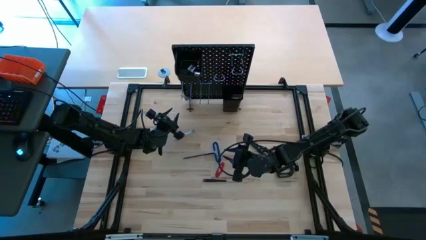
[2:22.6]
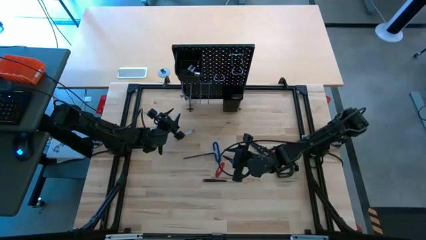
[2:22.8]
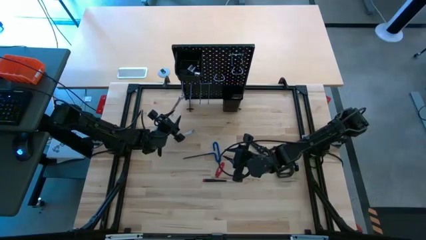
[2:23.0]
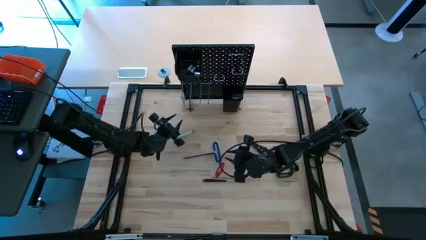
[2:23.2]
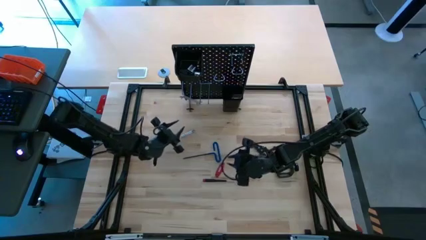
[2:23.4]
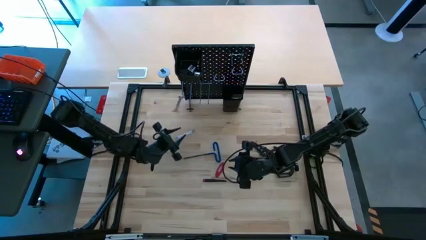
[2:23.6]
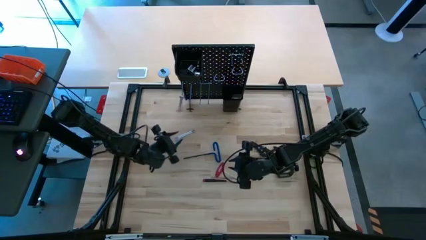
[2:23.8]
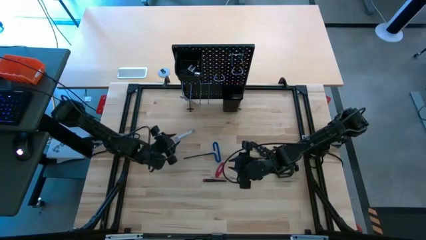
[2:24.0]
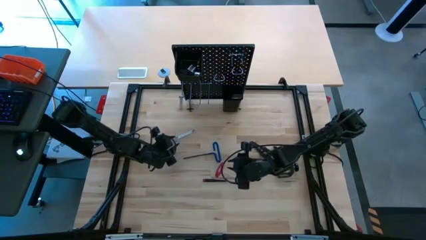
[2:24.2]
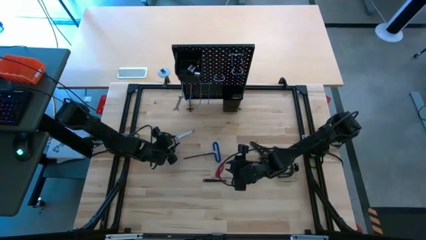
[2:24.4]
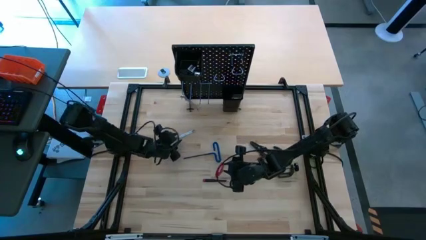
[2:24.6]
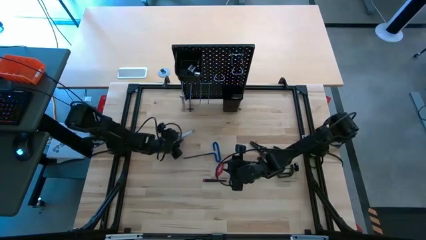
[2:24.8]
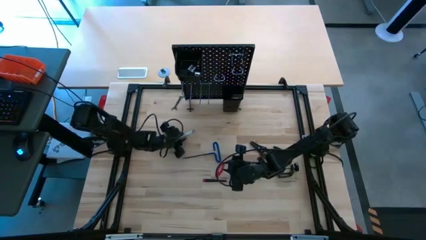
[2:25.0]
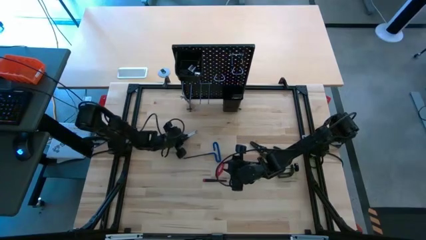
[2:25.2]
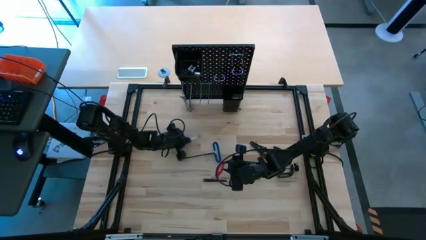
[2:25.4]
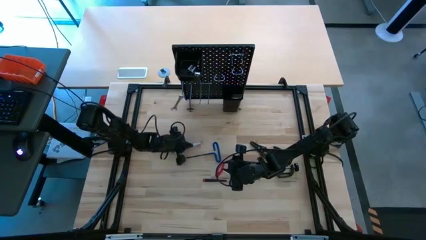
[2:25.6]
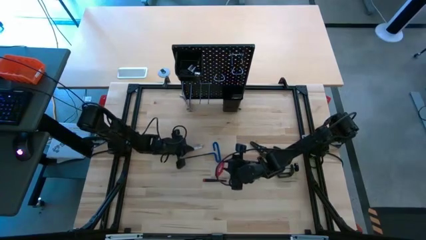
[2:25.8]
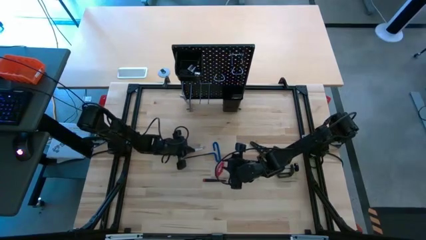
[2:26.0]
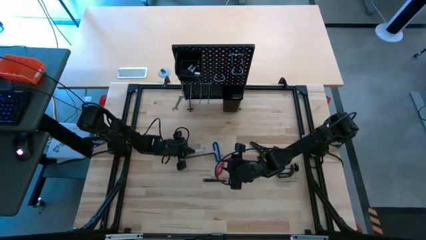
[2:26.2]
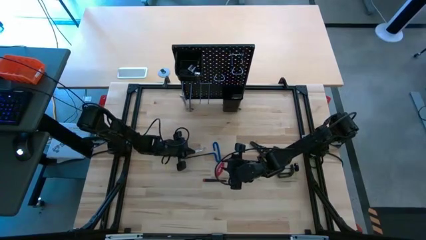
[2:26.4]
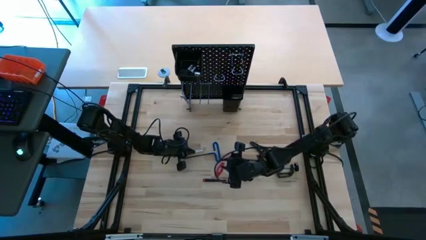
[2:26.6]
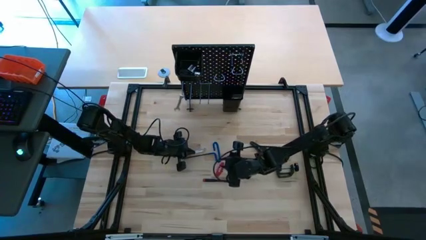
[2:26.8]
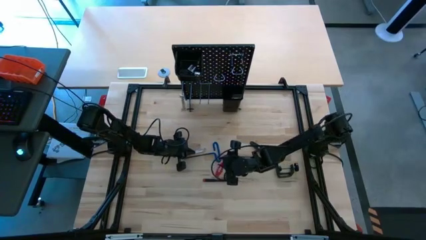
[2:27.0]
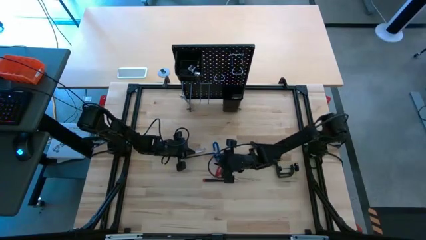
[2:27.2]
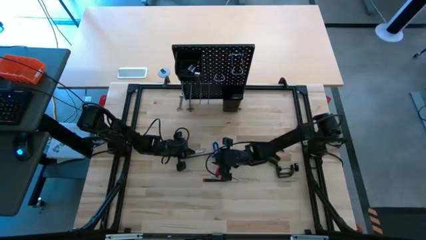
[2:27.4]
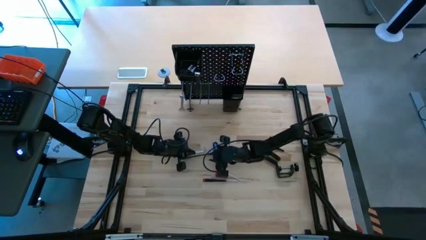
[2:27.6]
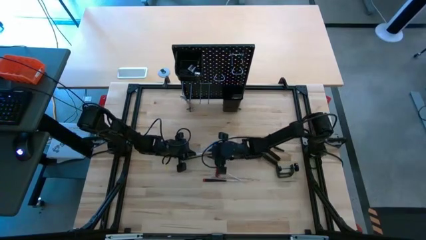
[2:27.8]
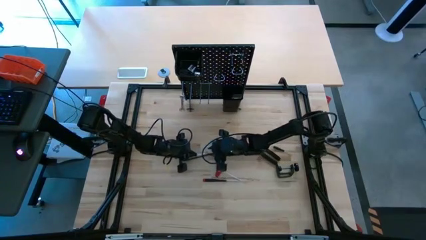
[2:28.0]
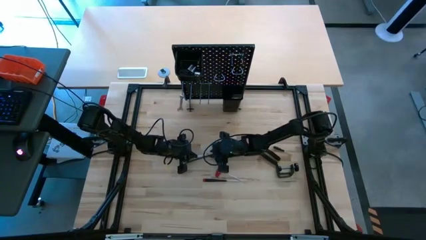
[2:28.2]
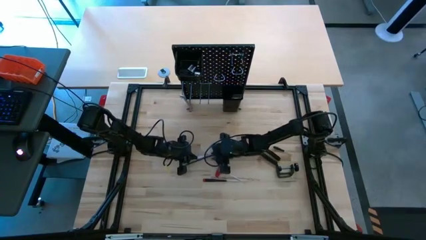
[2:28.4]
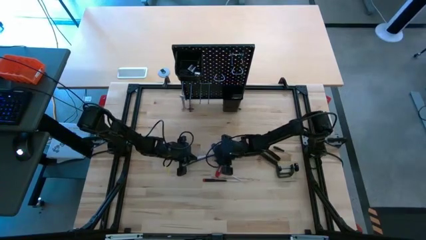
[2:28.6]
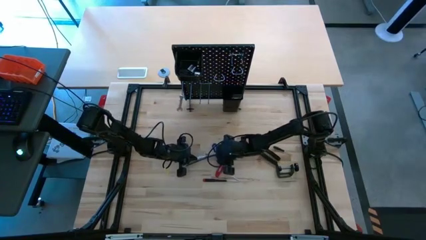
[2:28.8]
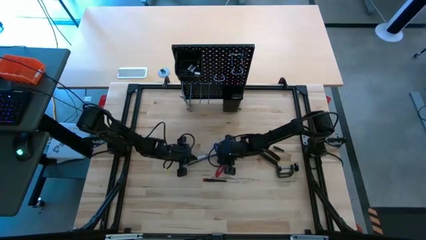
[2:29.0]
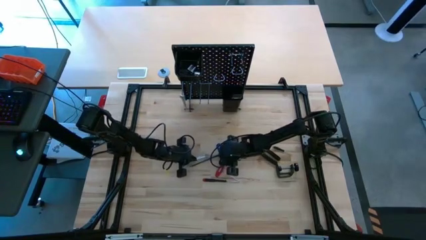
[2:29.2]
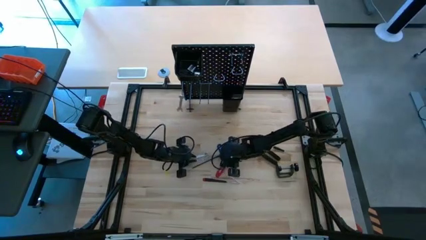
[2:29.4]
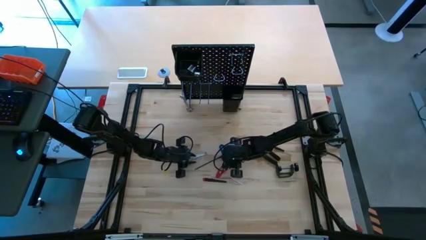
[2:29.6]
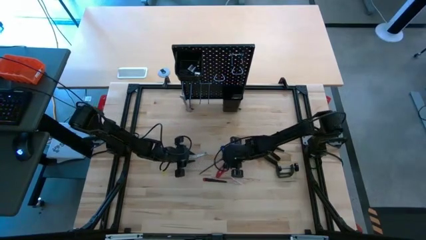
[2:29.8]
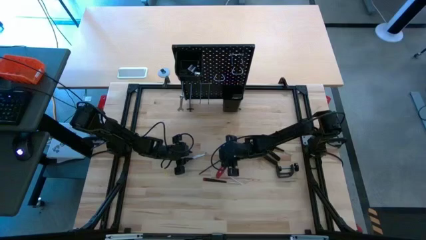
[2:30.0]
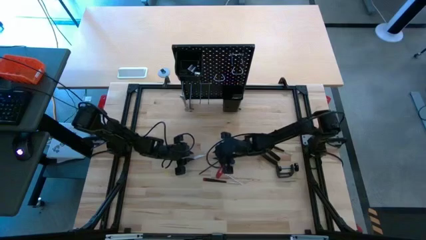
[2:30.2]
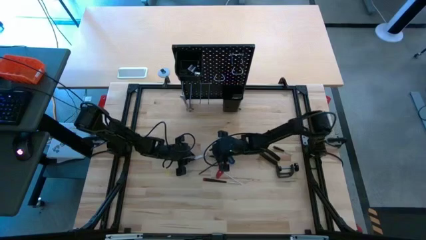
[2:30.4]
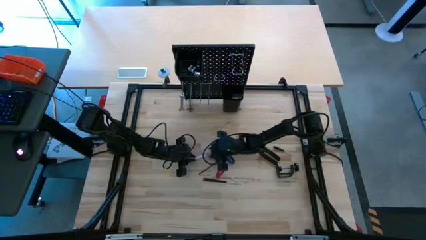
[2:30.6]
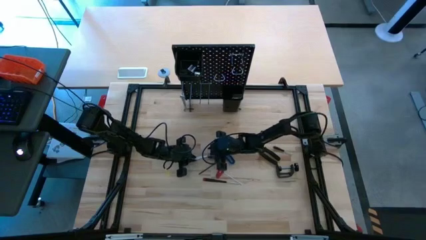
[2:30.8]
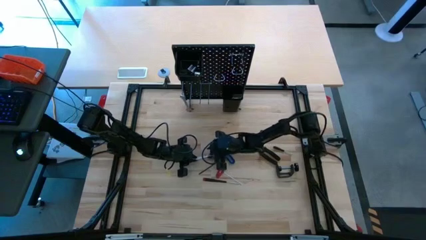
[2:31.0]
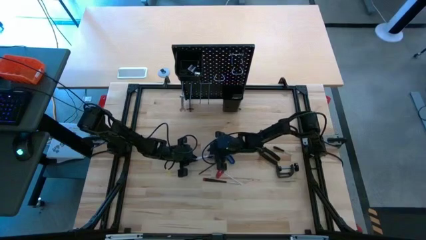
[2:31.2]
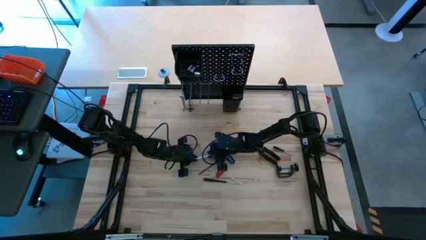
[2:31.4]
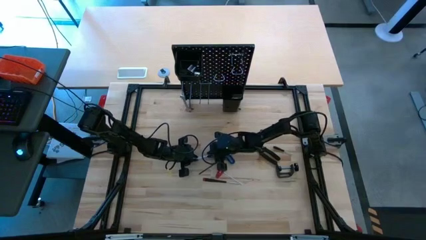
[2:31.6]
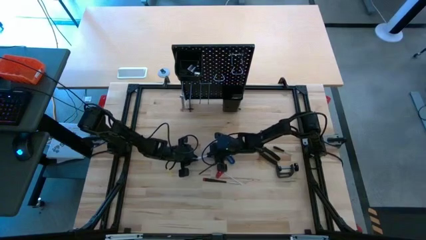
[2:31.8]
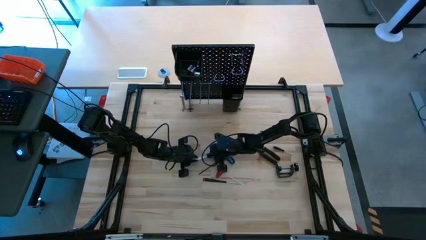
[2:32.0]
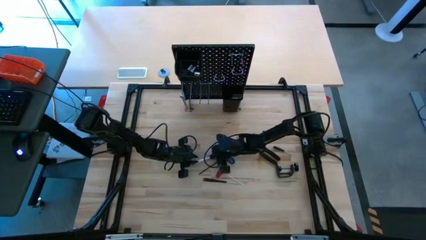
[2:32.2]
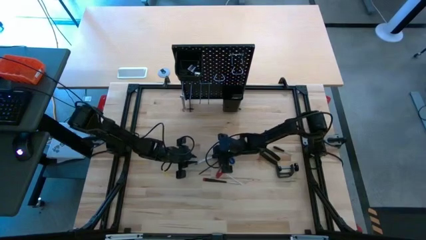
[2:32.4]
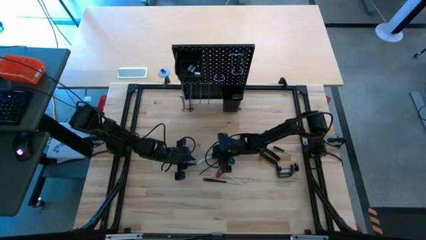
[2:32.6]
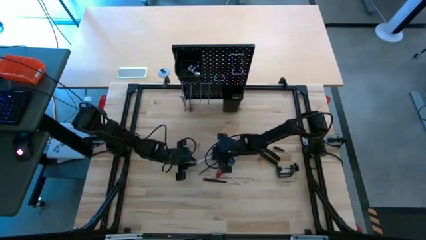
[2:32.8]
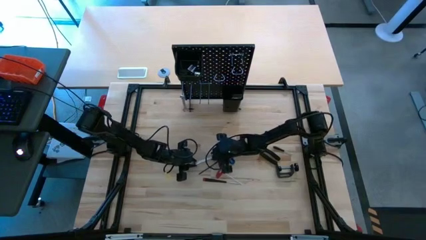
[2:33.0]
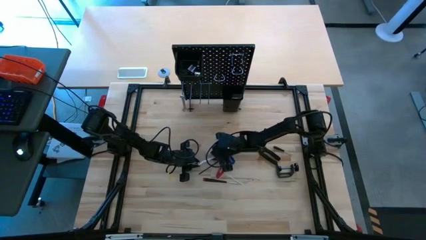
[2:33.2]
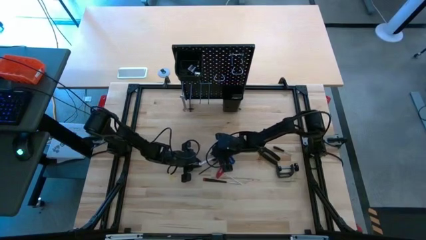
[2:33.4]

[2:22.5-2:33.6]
Task: Hang tools onto peg board
Hang the wrench on the pegboard
